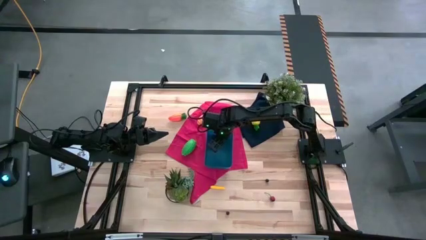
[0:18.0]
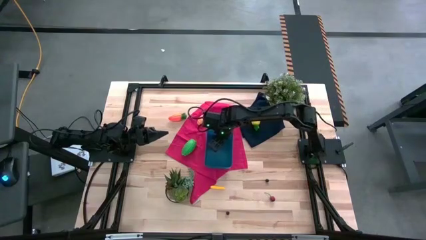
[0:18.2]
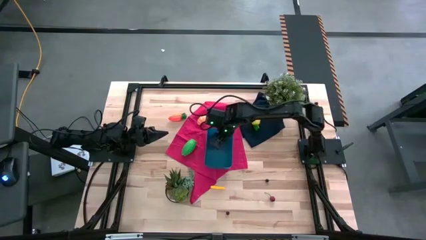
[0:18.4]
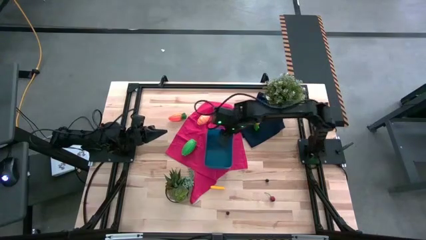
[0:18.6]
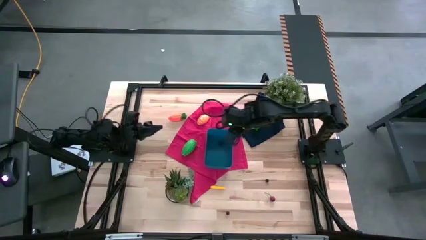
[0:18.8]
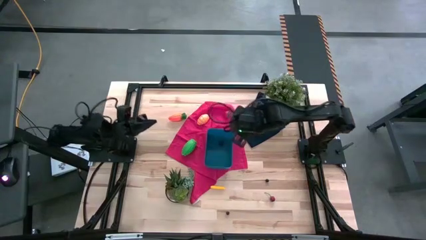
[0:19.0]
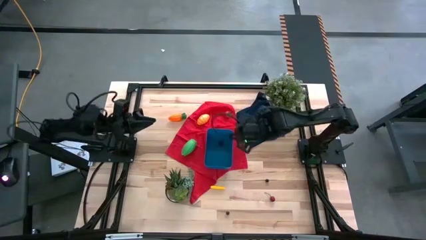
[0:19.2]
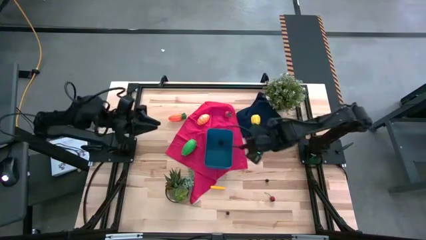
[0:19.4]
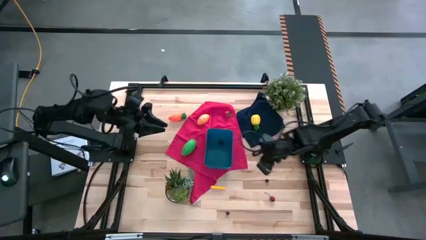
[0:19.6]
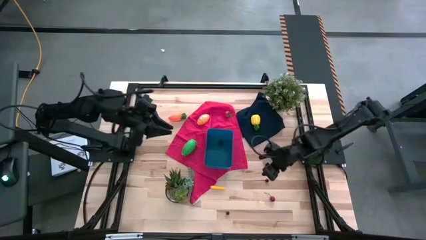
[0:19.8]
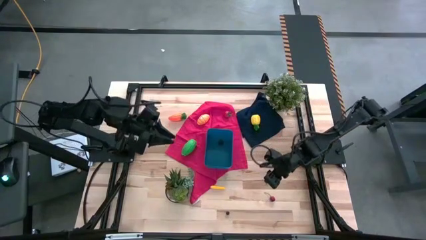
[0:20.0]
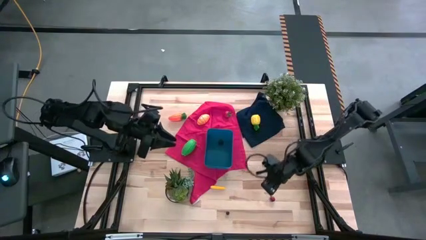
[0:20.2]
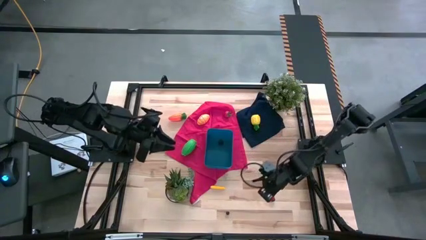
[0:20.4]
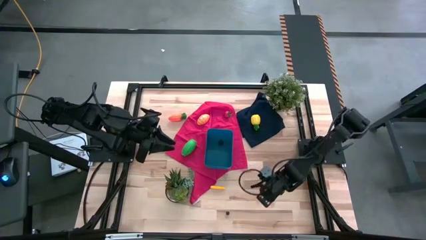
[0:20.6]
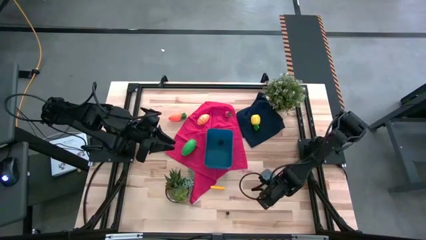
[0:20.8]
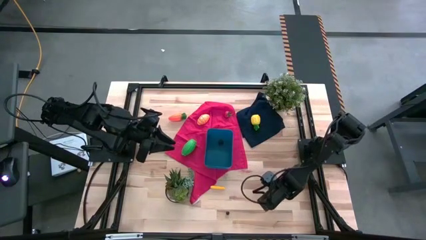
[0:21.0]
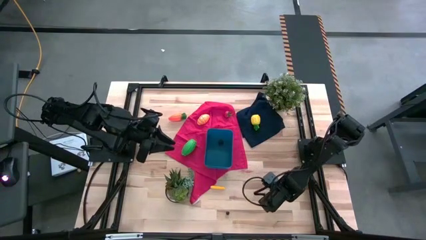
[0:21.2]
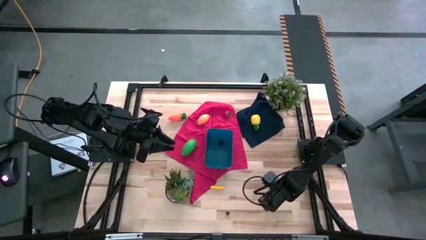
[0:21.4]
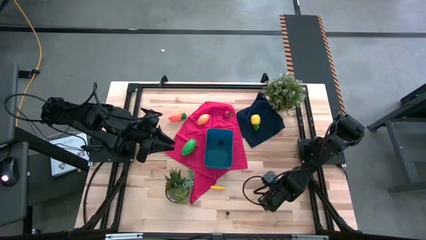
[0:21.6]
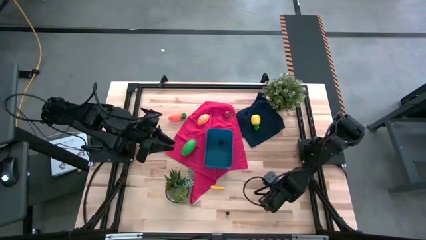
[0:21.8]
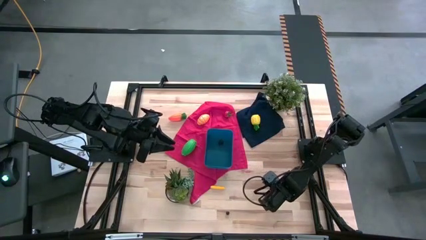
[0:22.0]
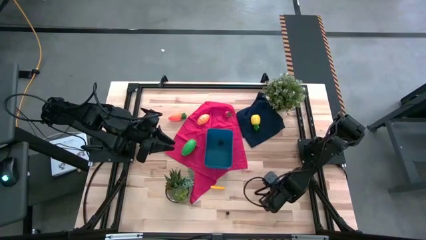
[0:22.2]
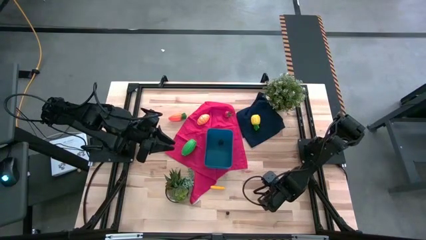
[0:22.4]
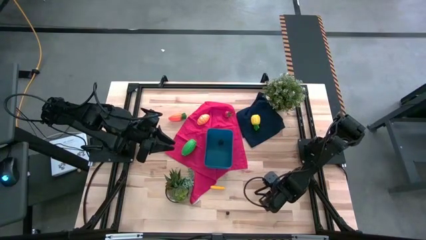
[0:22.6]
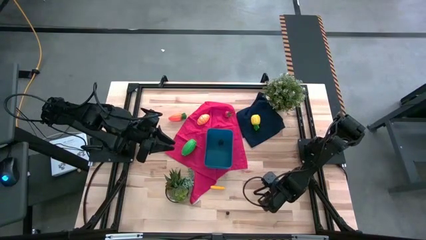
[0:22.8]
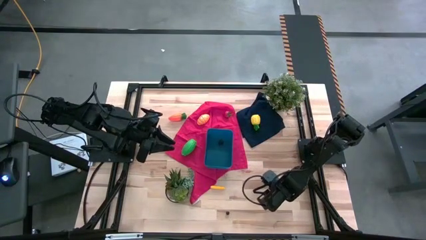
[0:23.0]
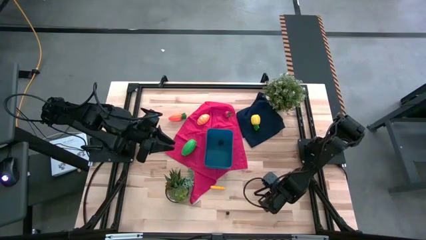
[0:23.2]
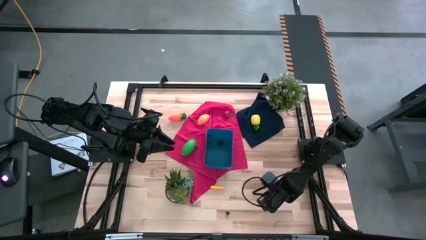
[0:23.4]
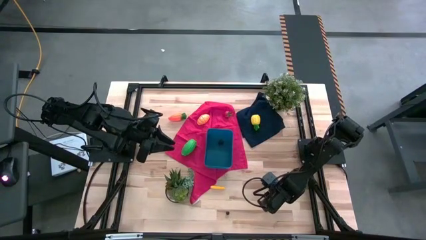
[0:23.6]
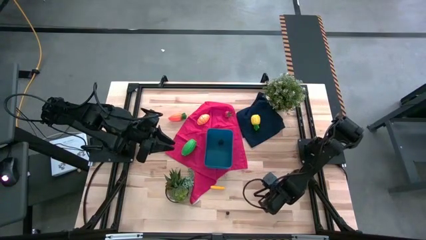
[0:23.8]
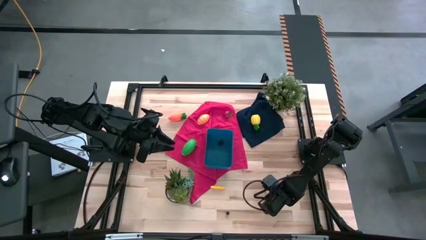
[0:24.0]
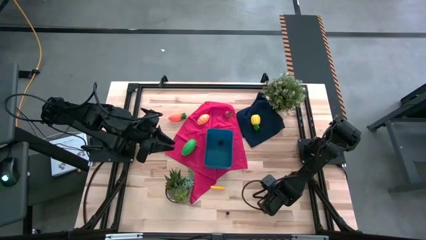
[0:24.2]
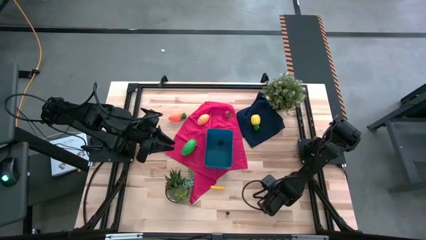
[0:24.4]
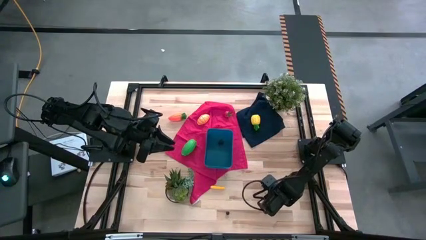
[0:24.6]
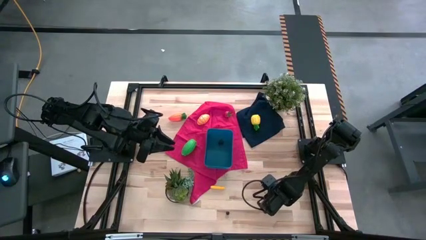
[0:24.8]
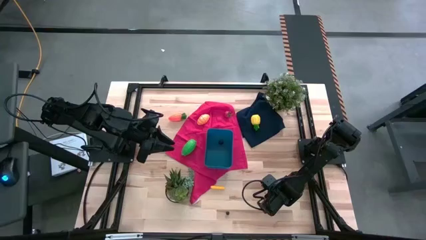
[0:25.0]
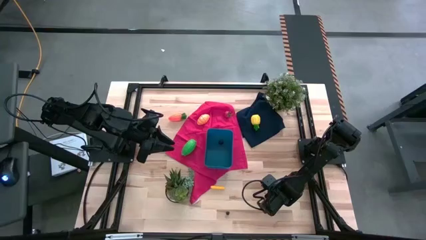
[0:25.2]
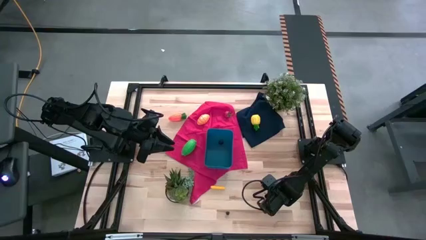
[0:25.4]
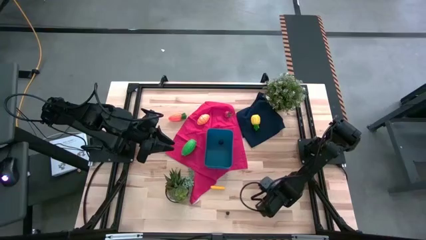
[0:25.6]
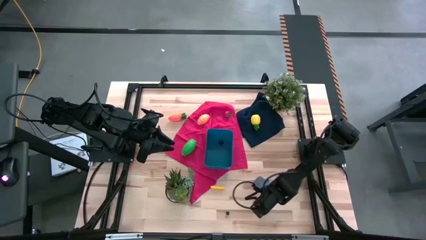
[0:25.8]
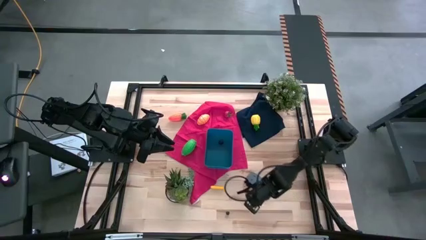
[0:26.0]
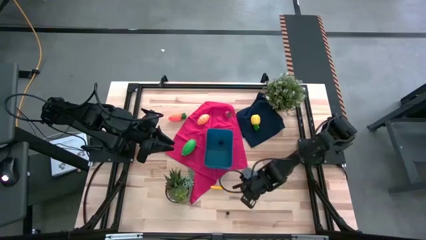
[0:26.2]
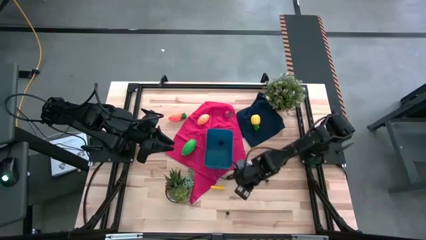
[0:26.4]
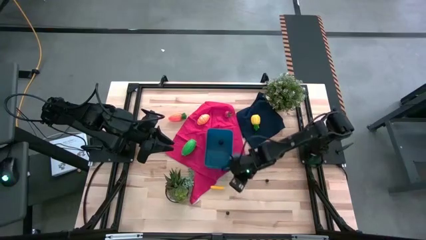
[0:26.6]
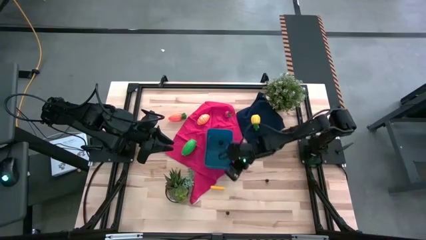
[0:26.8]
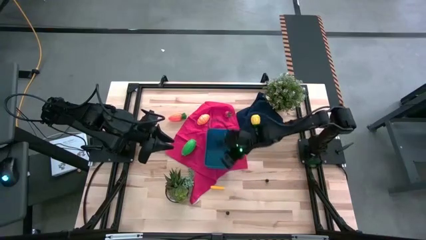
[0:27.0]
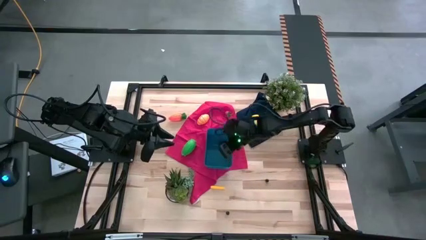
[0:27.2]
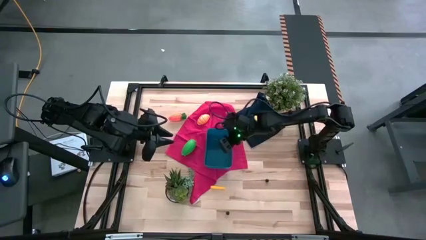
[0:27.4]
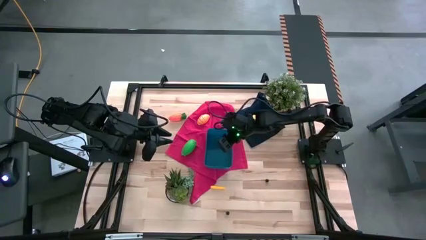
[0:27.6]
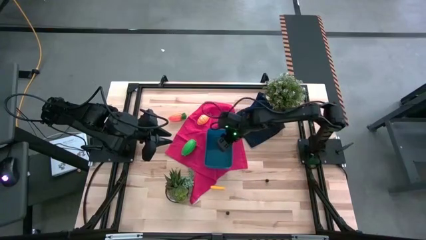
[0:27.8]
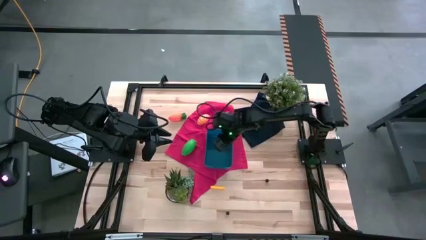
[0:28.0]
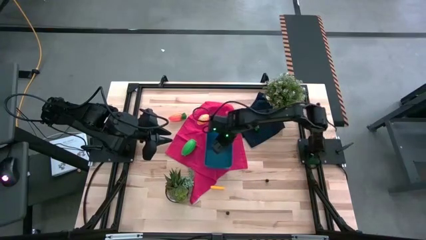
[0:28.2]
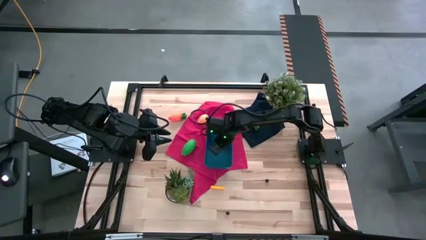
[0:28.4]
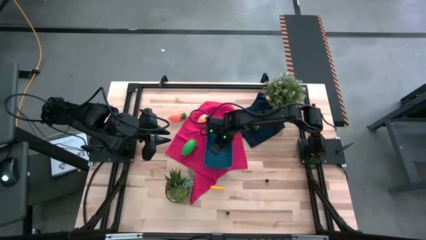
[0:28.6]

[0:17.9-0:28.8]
Task: Pick and placing Produce into tupperware
Put the cherry into the blue bin

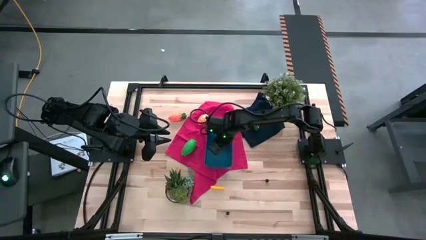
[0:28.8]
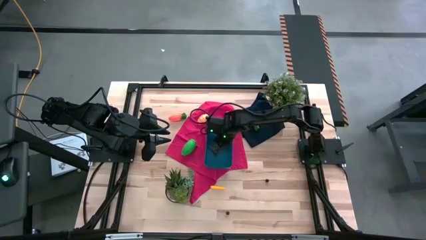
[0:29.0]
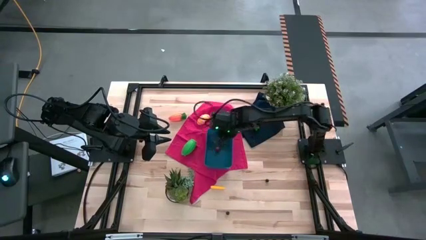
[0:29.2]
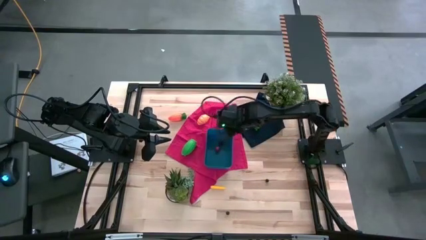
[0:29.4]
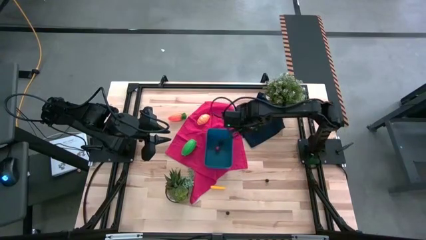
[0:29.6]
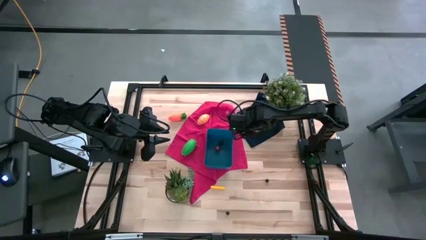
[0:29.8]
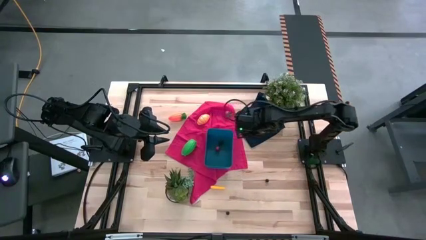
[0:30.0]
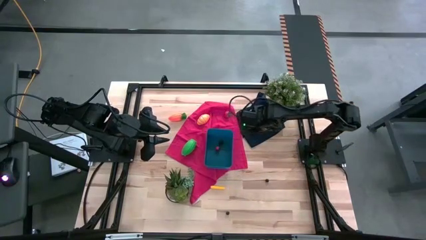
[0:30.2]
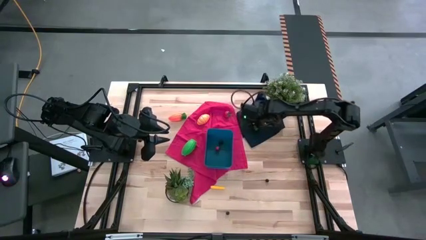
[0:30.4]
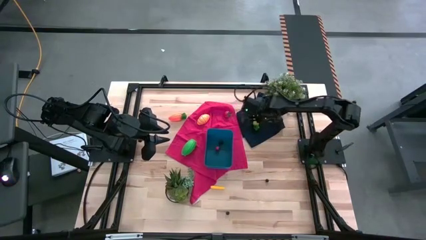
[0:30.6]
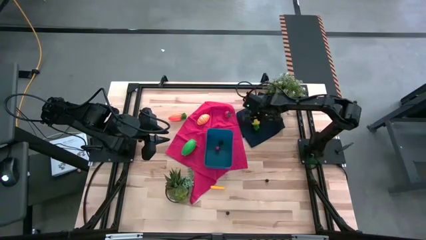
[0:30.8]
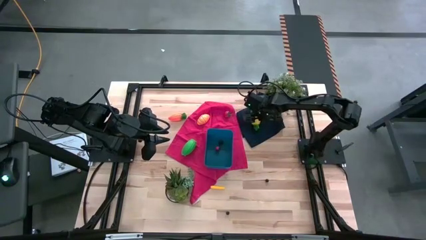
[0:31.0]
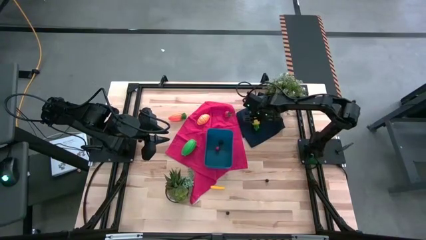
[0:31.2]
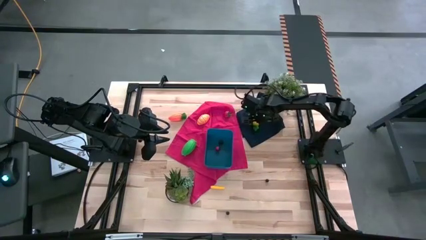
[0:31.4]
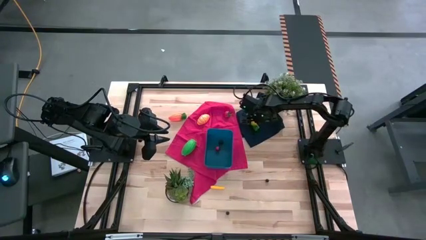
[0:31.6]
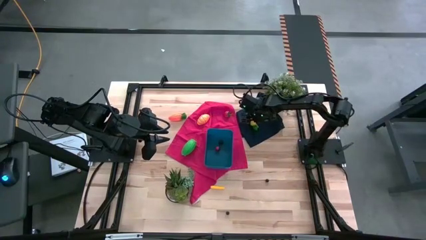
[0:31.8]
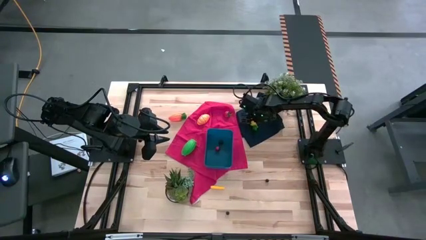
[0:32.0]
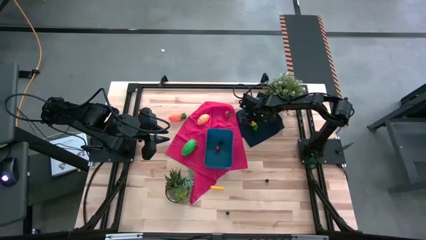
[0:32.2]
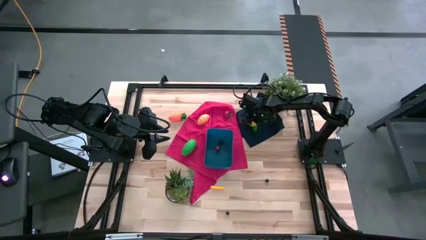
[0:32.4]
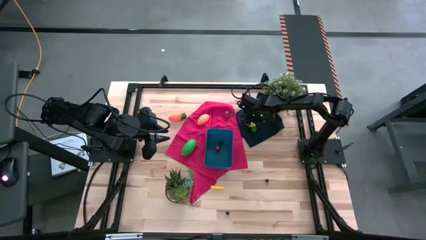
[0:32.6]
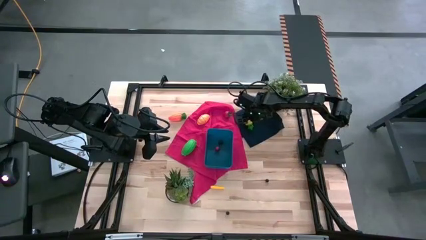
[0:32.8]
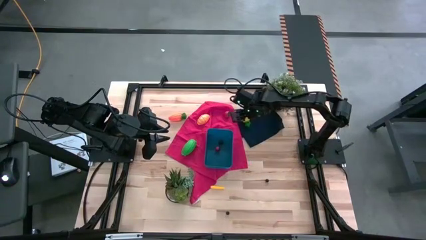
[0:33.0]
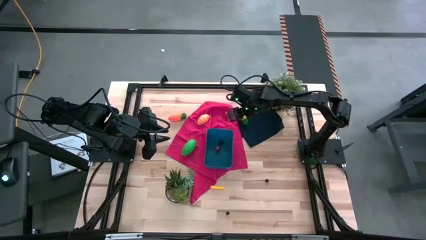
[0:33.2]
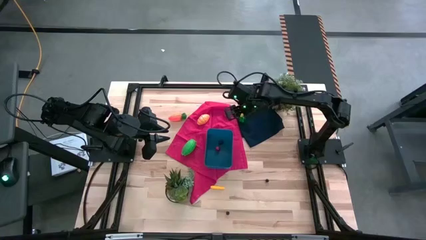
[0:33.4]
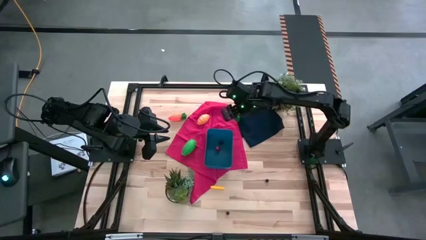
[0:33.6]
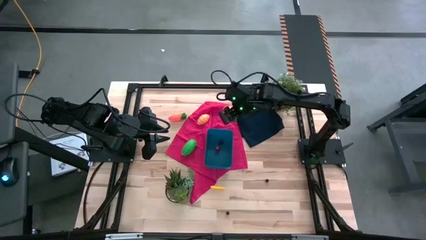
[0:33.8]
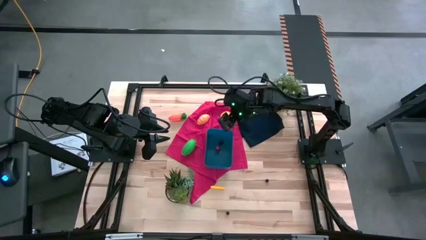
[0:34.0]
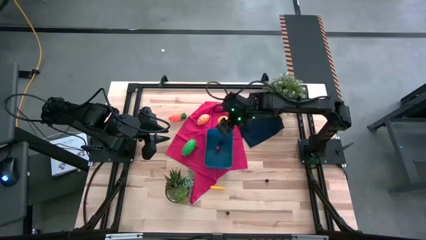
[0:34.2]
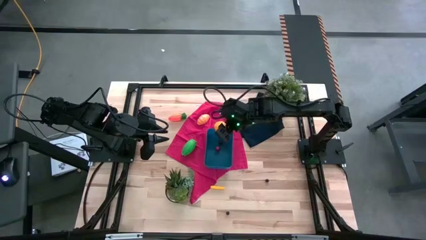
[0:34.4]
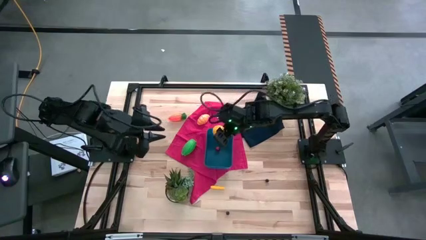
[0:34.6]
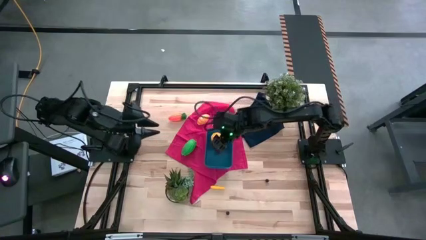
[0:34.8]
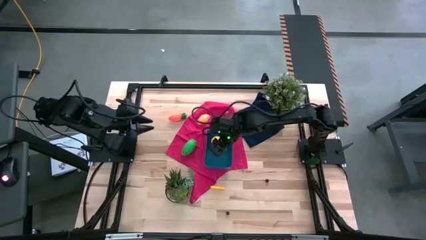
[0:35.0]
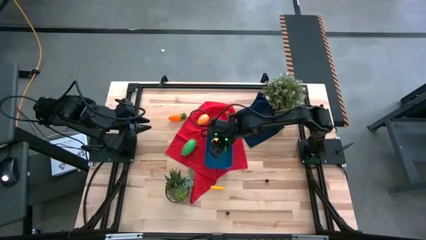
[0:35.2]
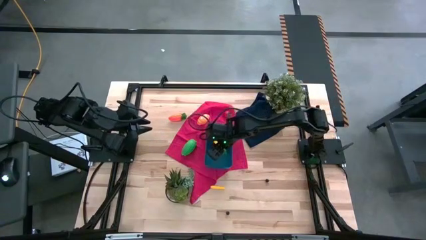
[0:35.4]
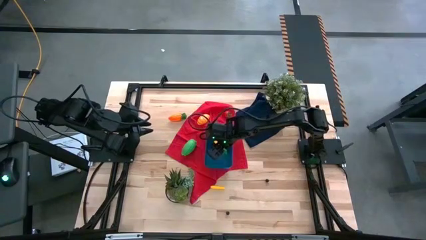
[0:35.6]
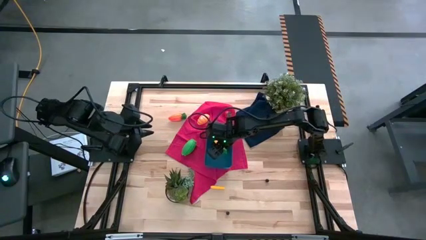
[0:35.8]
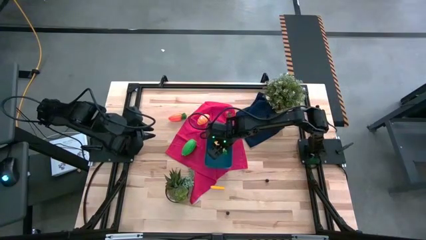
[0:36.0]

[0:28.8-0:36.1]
Put the pineapple into the blue bin
